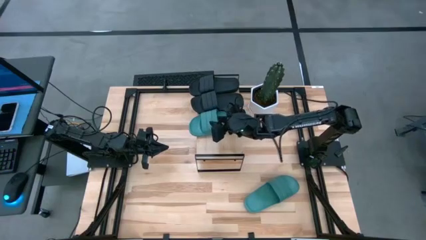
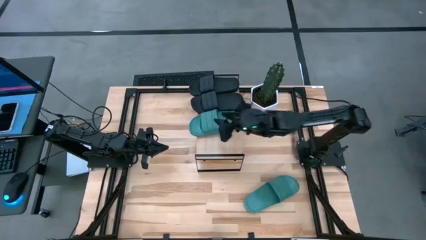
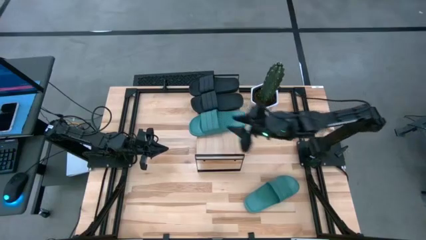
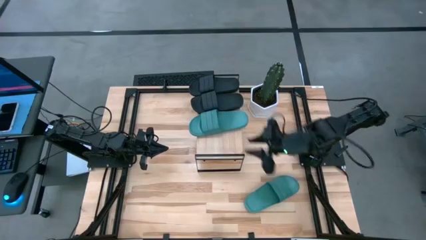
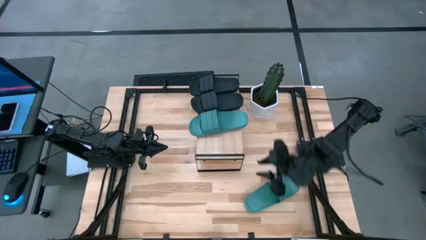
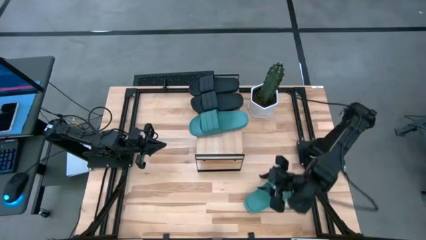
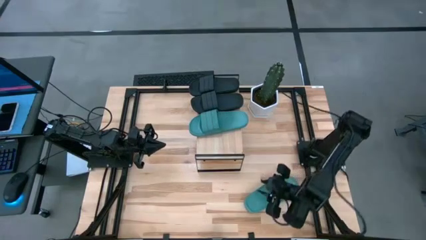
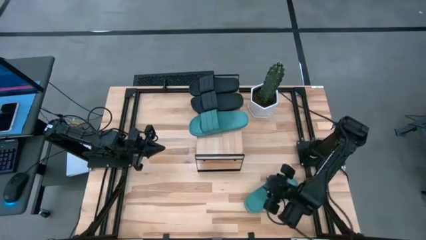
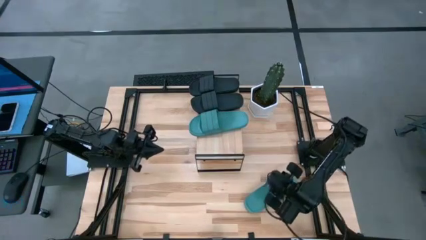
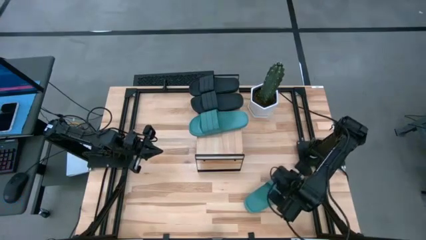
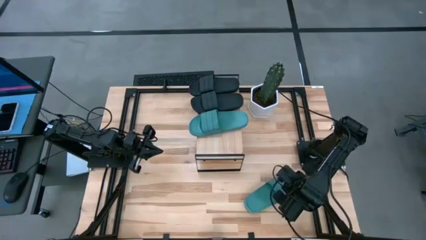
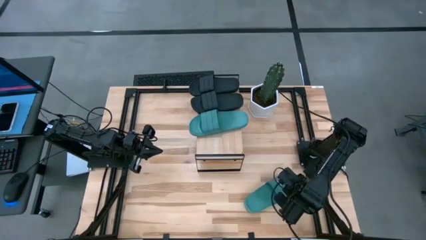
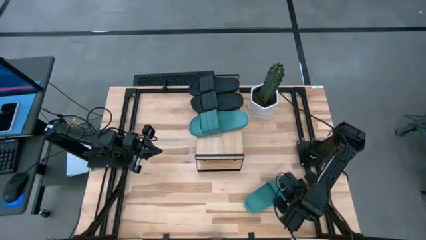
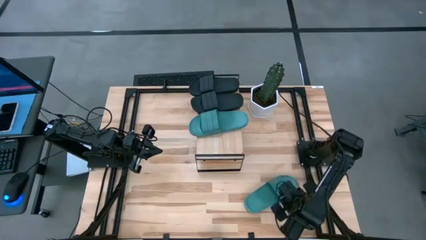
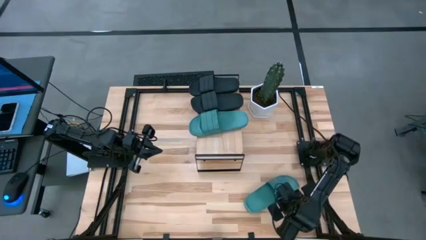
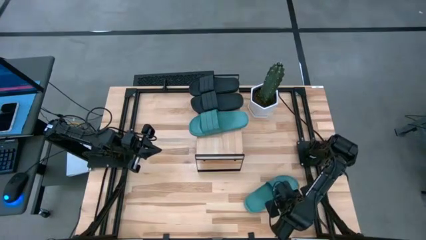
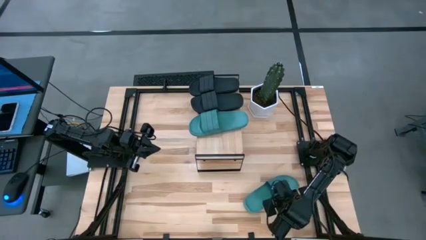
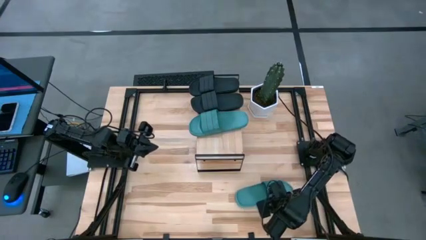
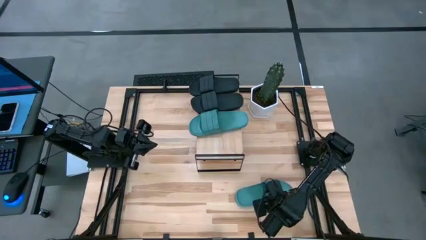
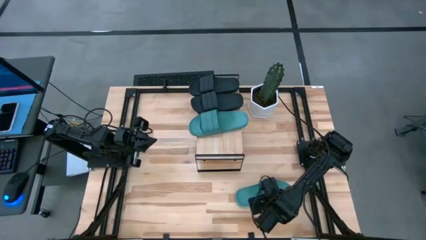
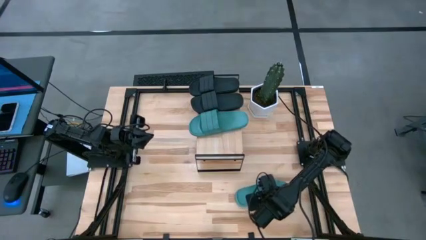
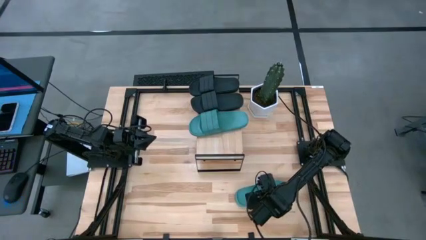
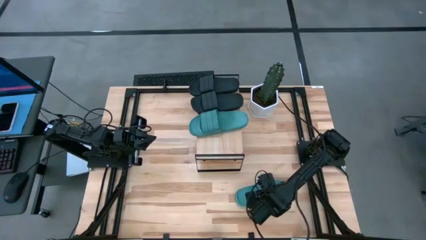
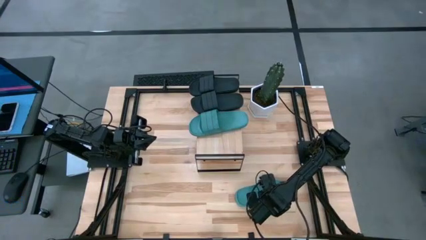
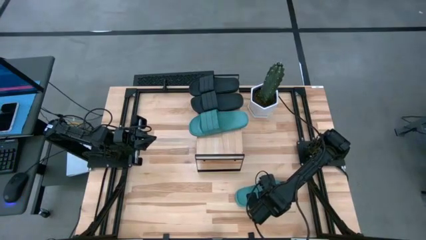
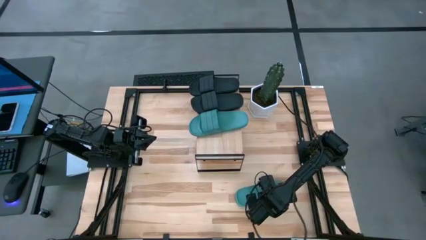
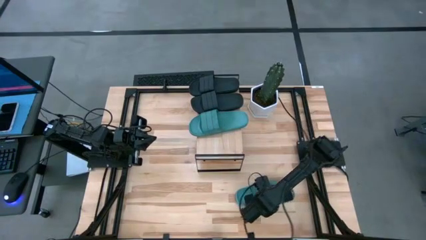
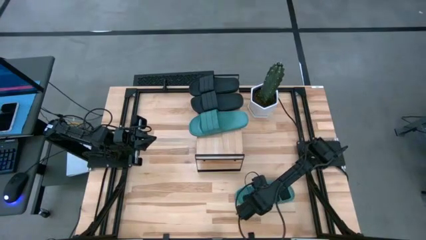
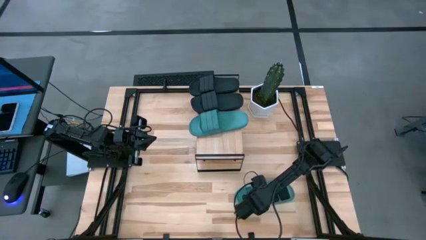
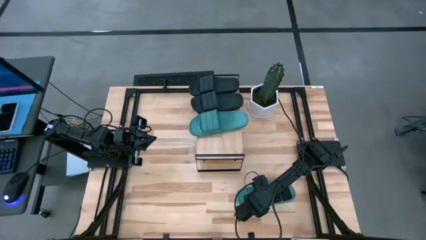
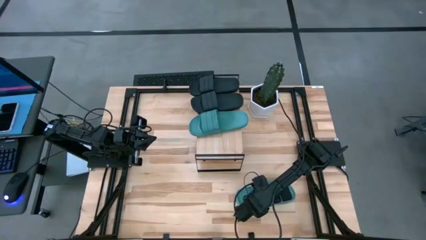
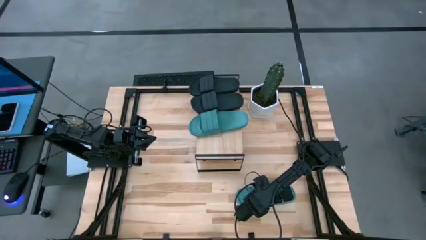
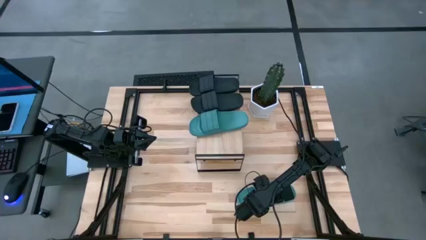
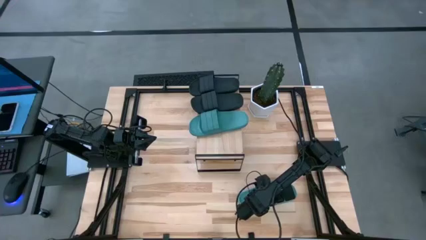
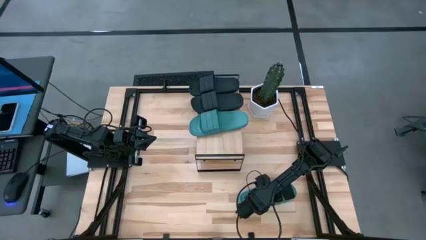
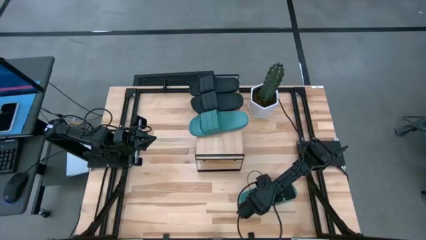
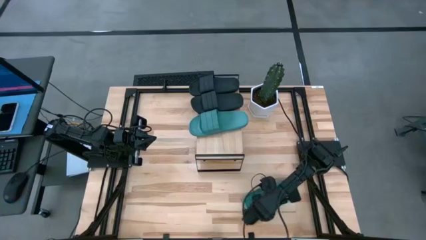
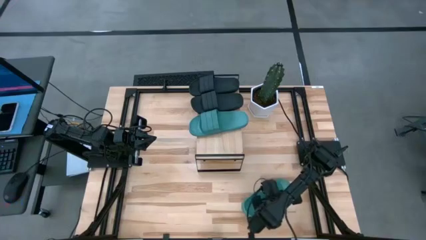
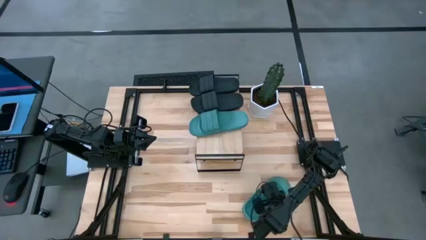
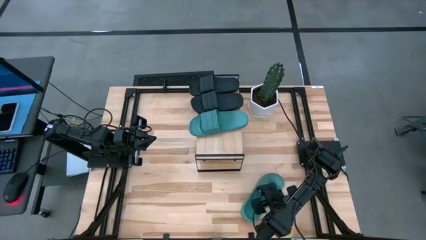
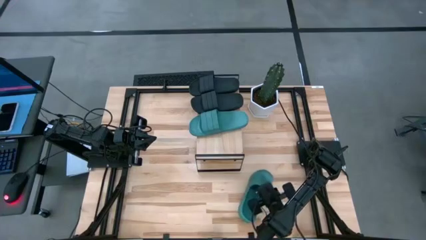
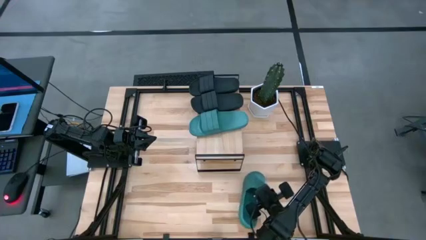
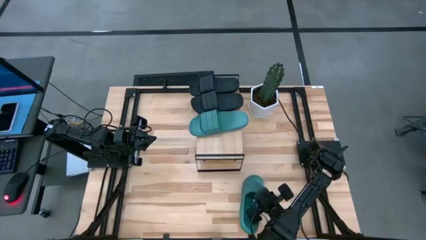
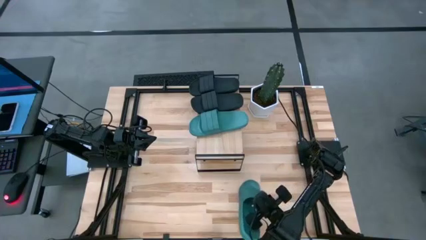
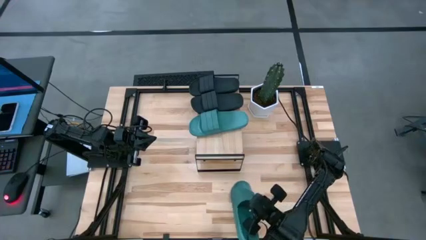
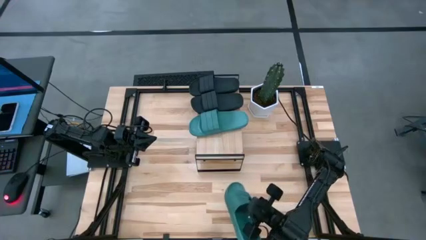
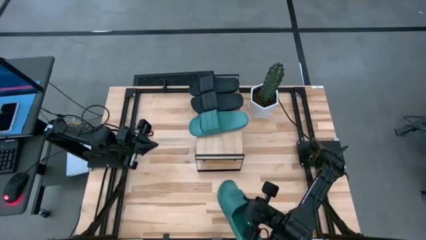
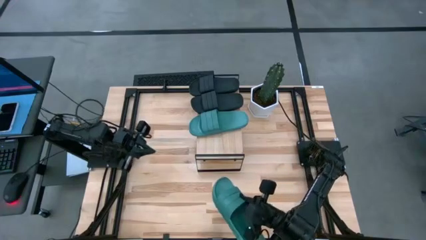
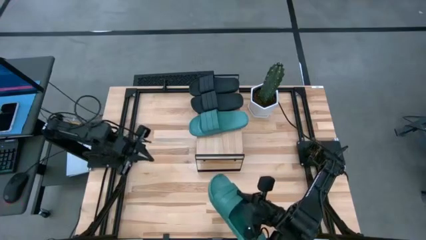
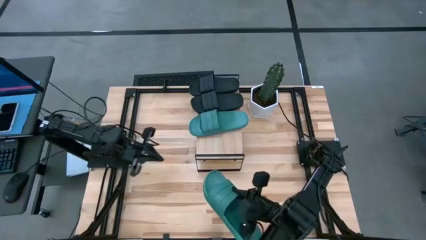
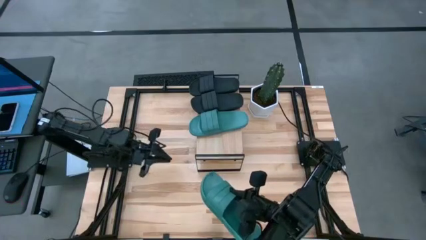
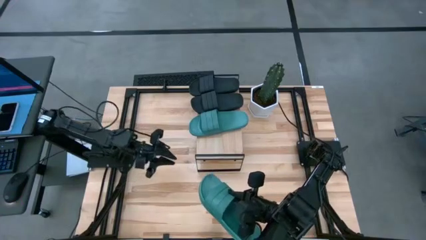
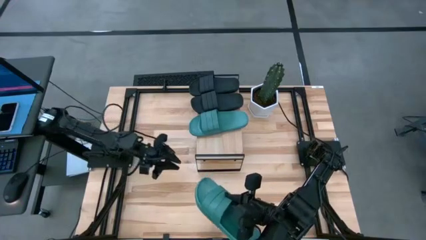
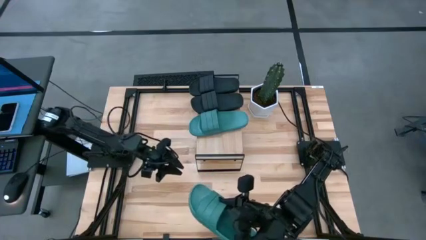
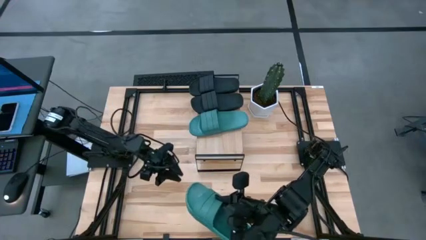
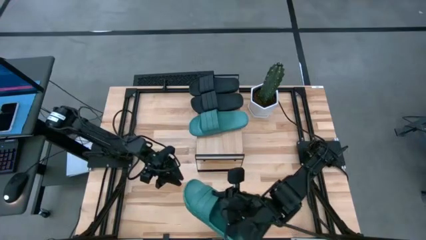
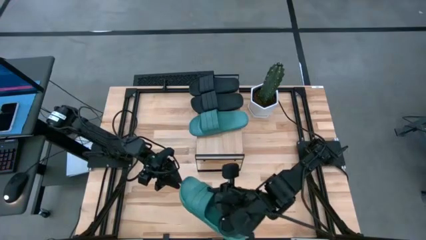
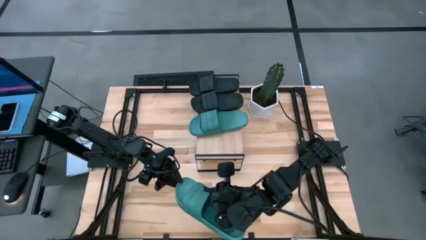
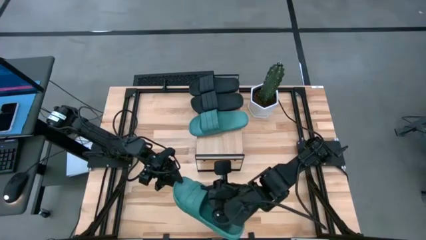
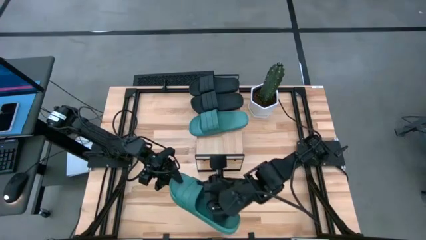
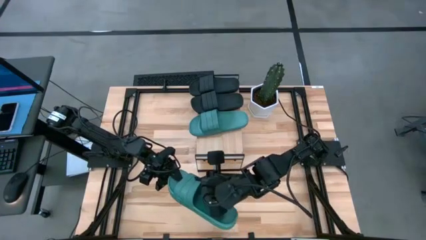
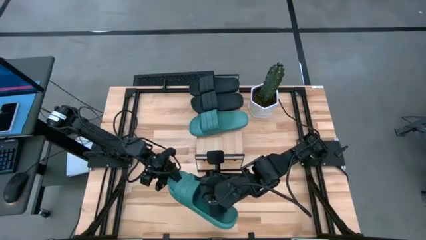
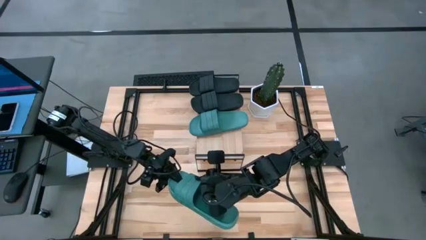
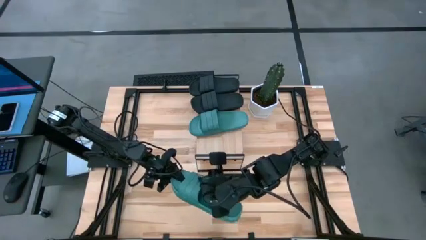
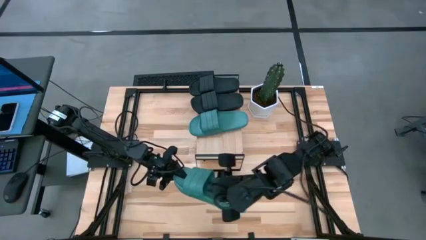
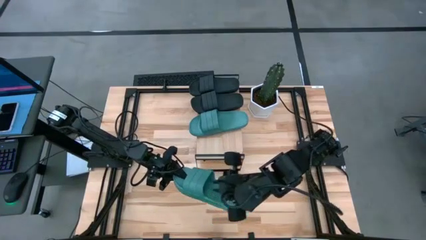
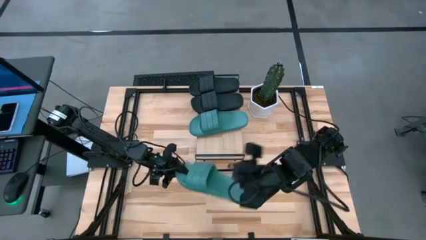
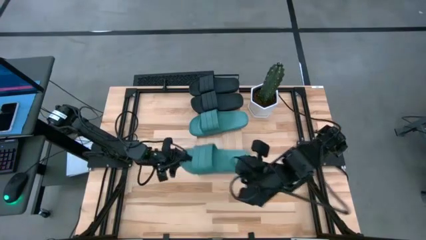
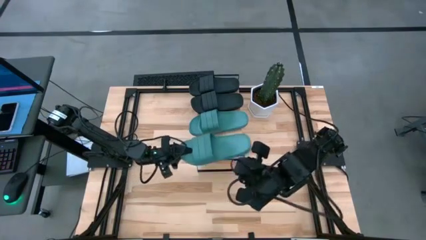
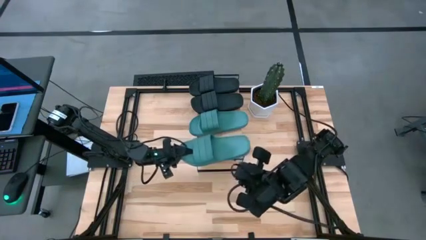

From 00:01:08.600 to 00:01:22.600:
Task: Pick and place slides into the shelf
Put the green slipper on the shelf

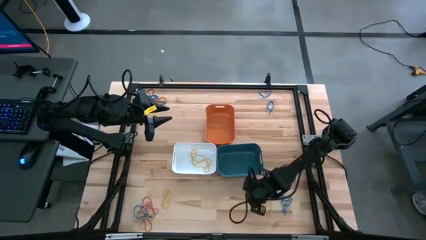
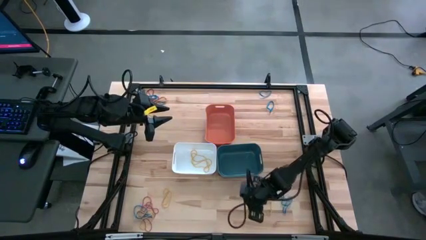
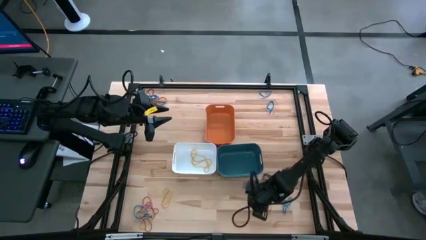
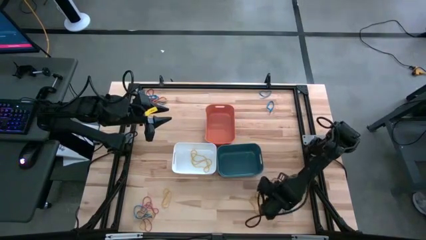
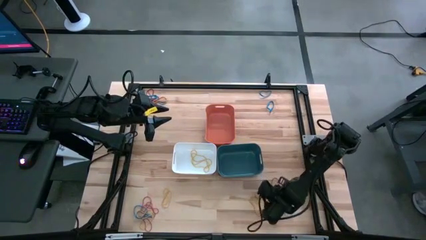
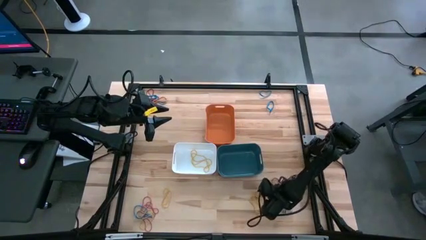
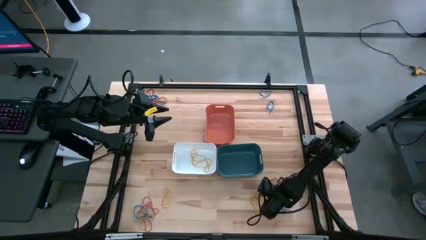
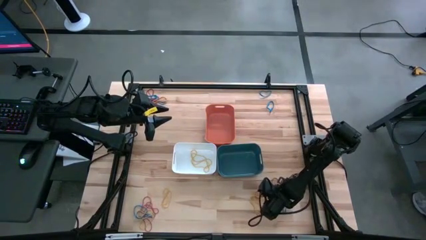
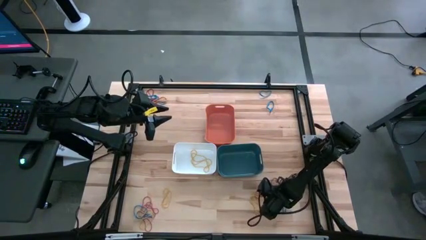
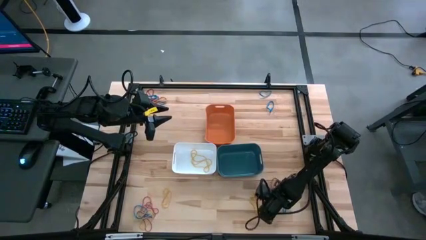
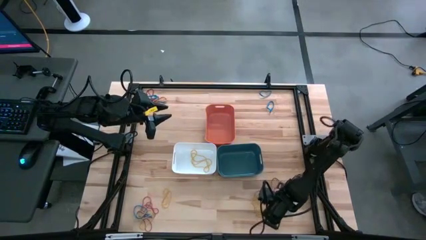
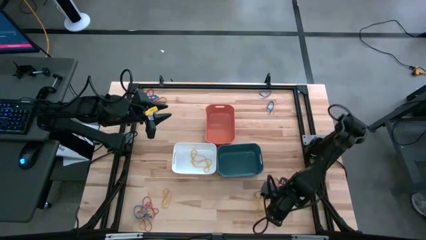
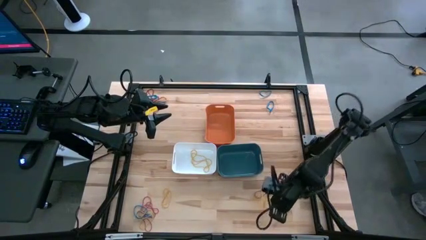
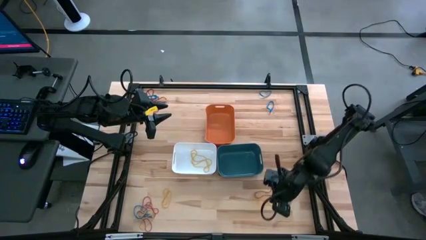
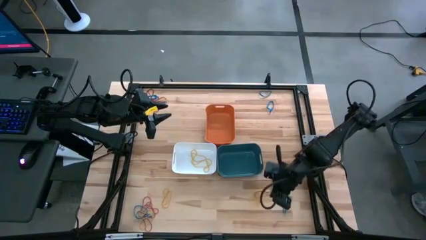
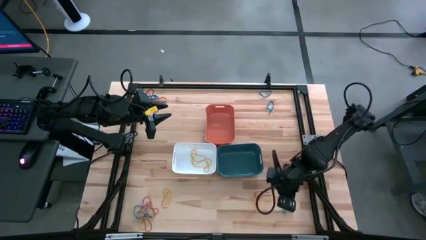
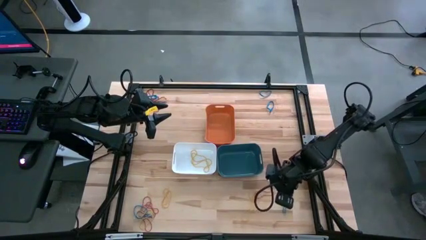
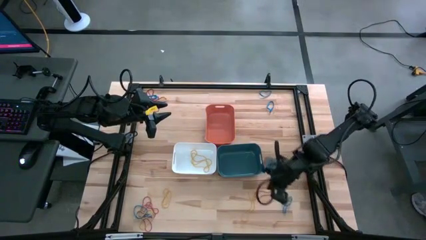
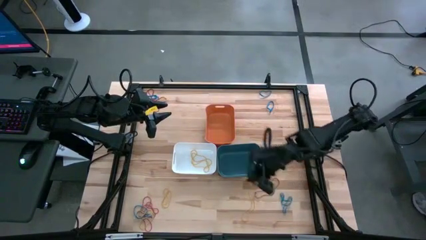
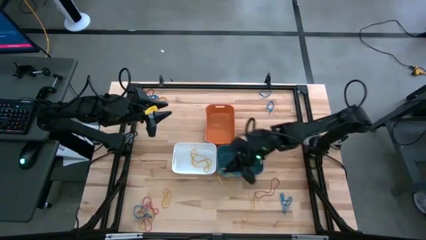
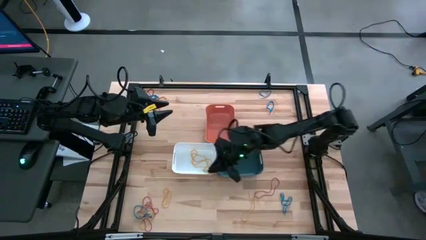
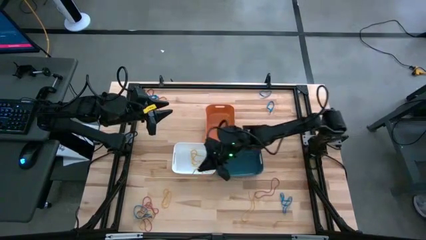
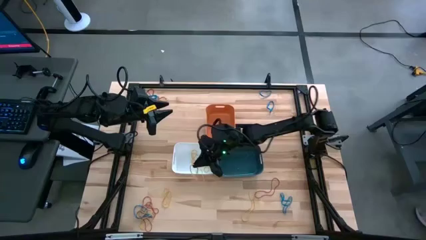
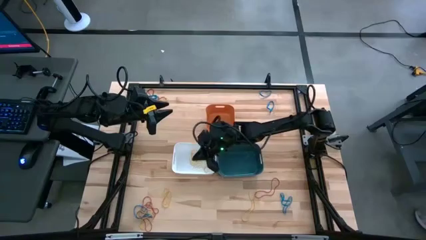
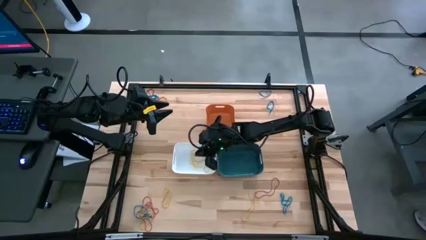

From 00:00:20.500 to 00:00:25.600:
Task: Sort rubber bands into baskets
Put the yellow rubber band into the white bin
